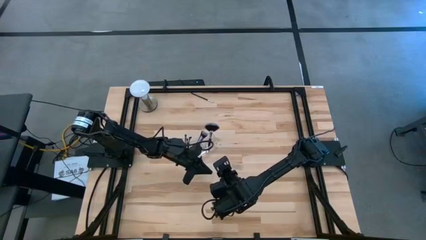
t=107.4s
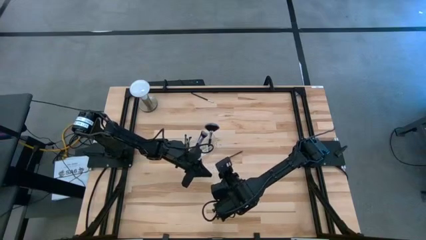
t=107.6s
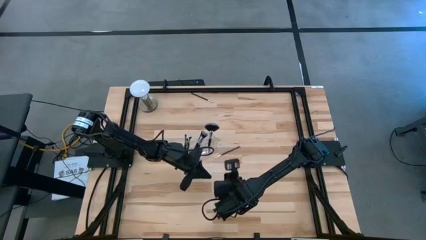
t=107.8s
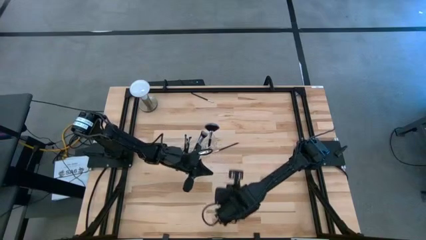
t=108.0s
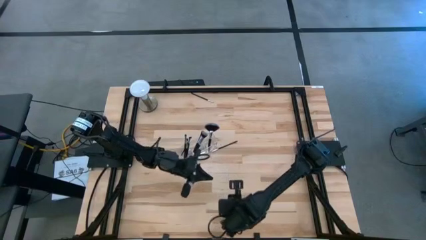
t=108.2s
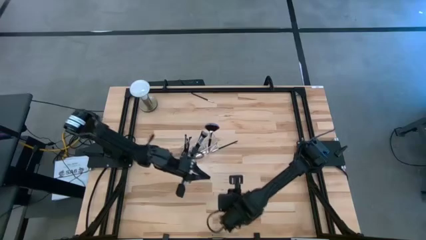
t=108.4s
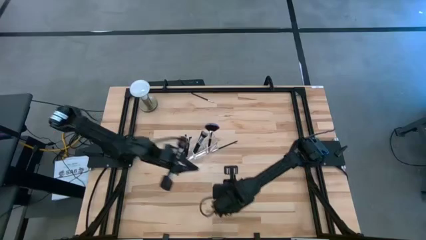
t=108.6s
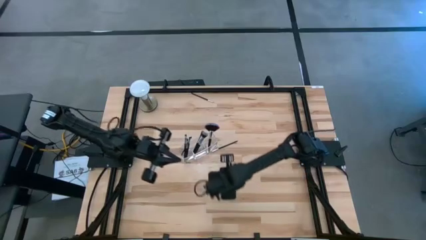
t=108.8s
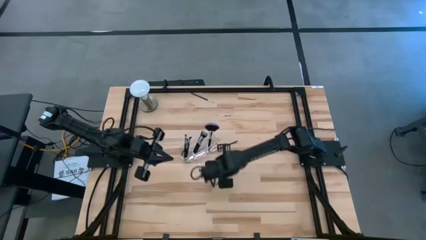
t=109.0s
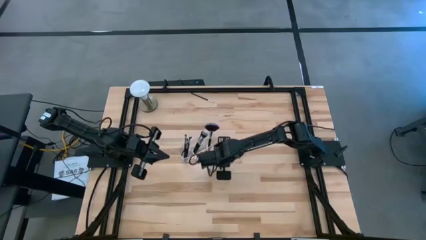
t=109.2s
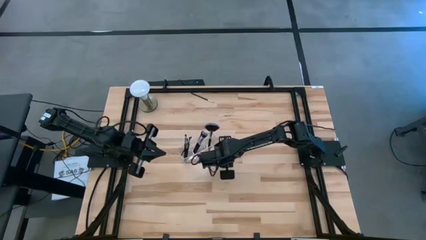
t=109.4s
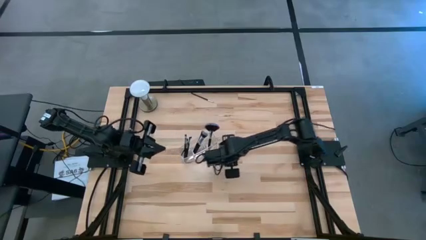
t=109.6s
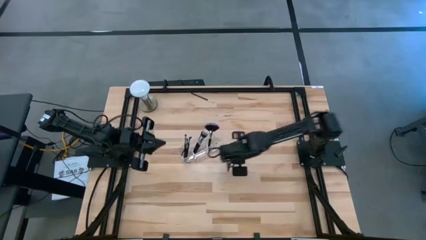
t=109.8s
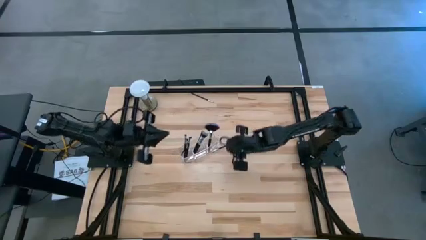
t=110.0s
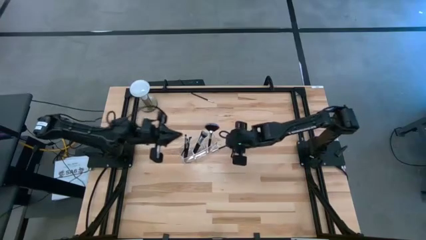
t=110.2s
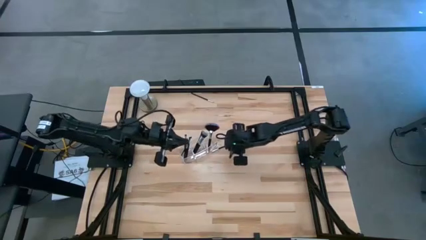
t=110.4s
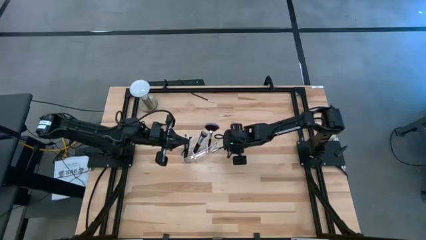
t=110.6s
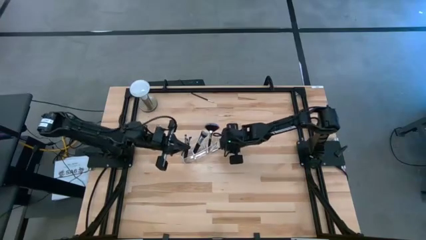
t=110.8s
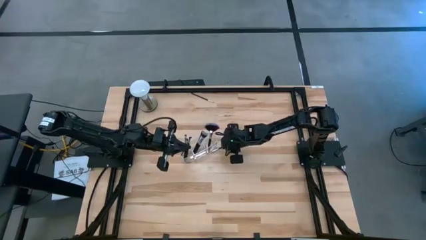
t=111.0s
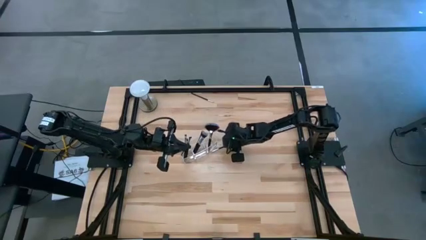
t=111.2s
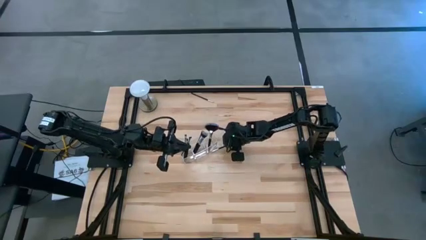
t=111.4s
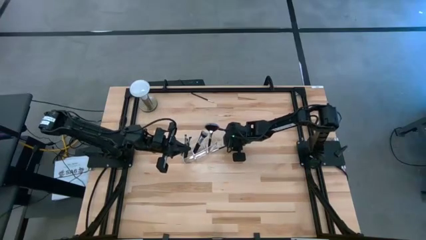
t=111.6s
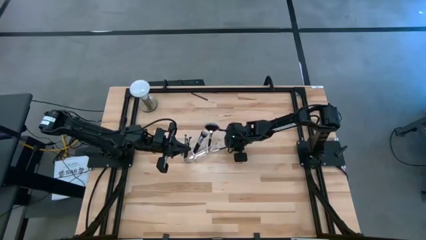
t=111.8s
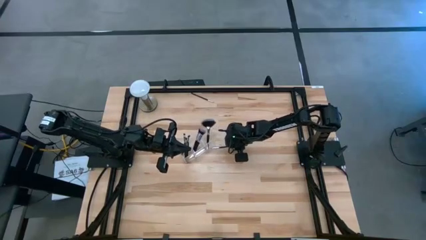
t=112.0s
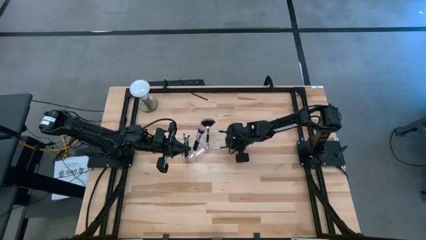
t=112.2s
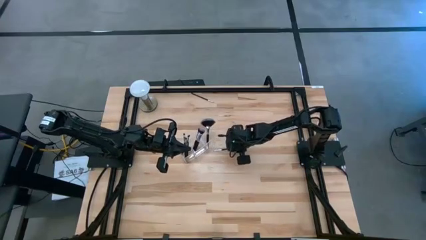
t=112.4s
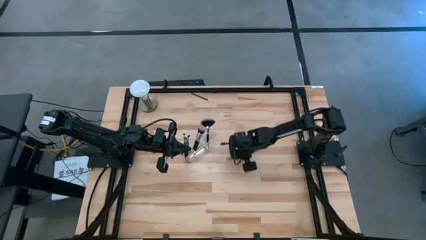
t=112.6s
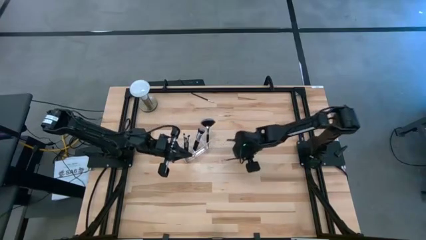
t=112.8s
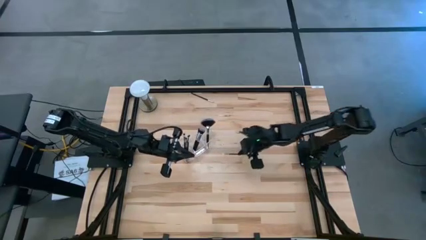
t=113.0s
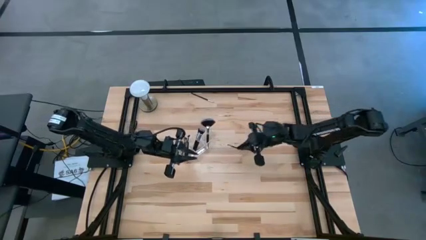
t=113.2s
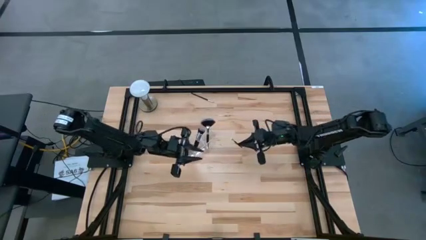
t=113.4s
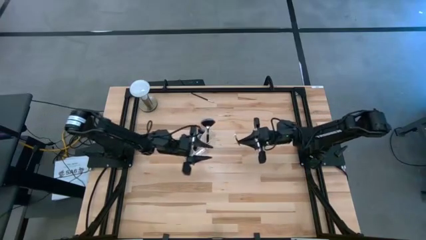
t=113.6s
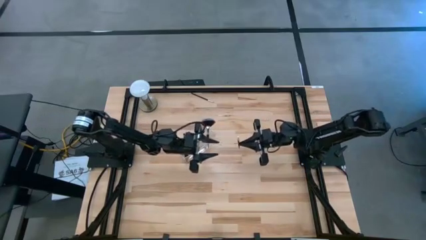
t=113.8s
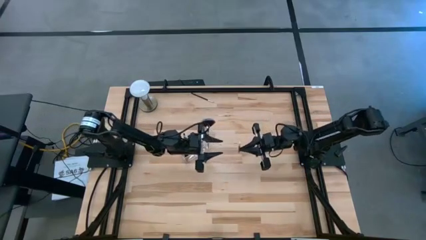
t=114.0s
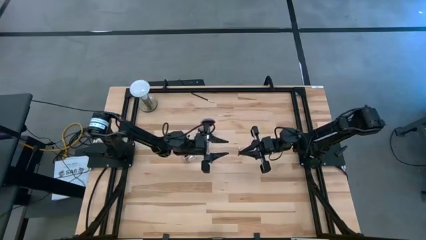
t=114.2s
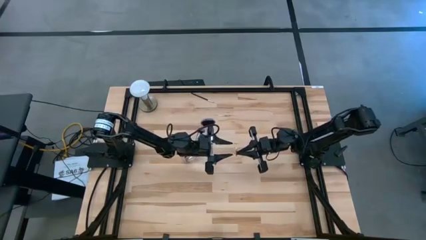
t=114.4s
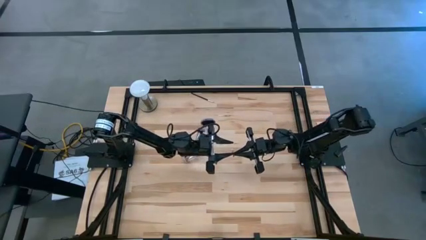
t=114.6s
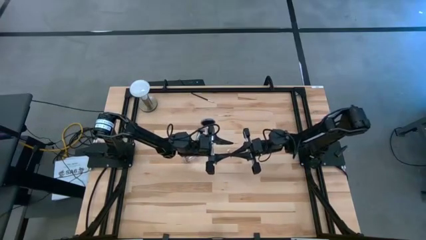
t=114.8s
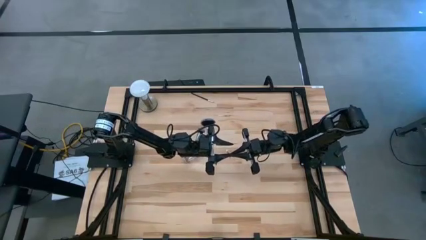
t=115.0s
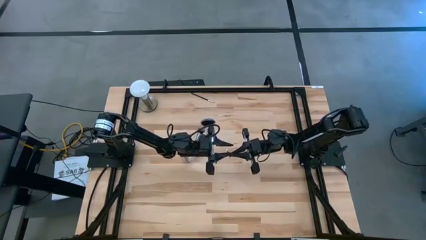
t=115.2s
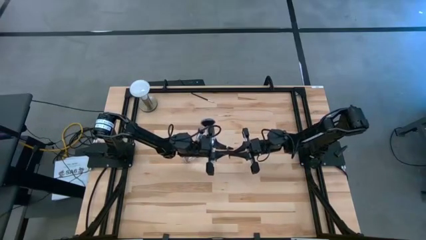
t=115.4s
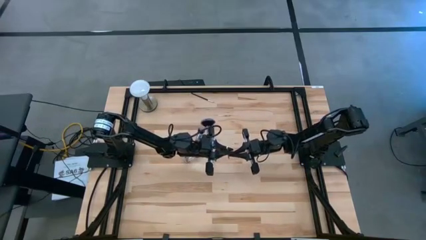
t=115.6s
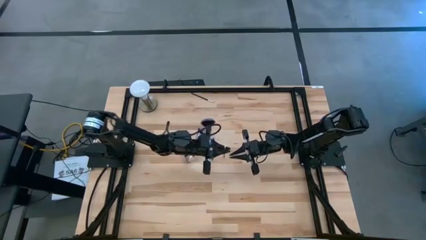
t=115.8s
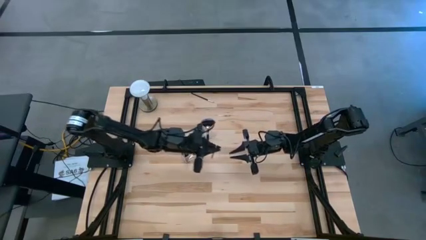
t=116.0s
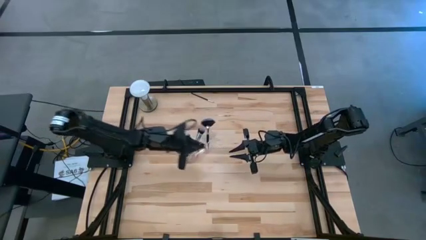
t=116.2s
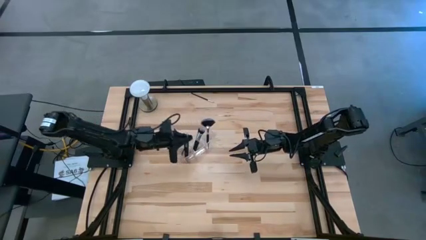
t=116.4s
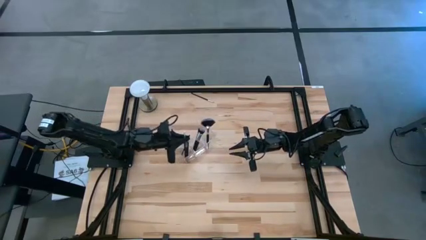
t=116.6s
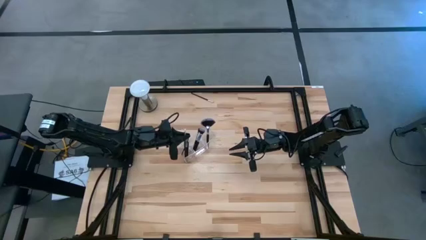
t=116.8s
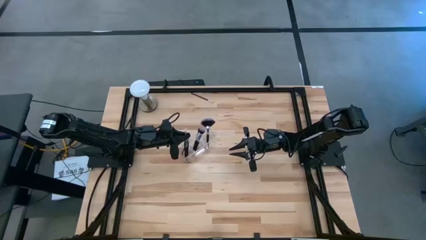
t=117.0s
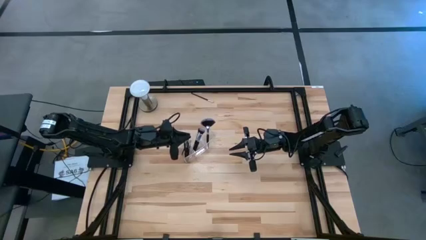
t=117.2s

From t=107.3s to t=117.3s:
Task: Put items in baskets/containers
Put the white eyeshadow brush into the left section of the transparent organizer

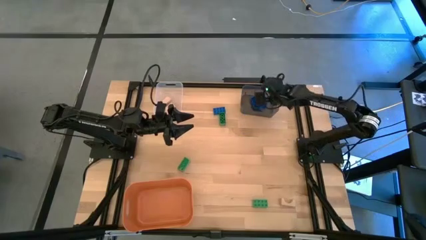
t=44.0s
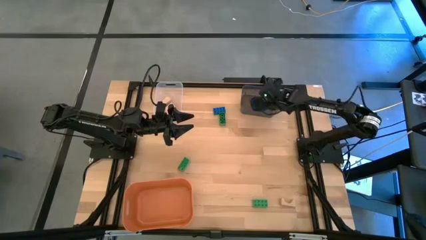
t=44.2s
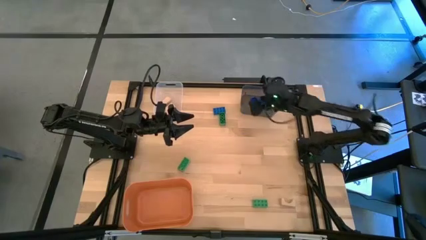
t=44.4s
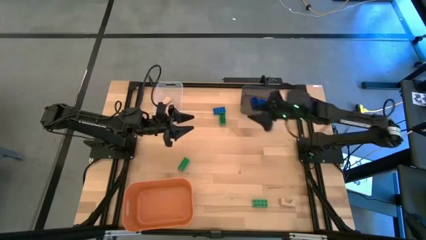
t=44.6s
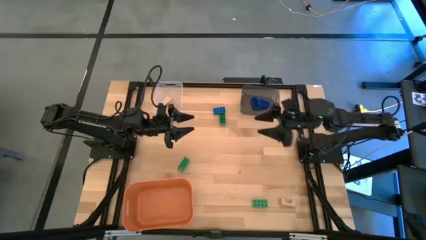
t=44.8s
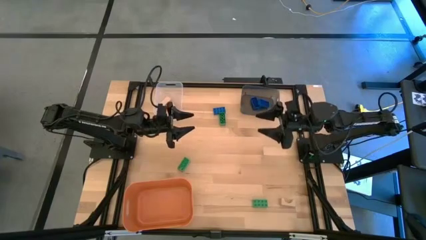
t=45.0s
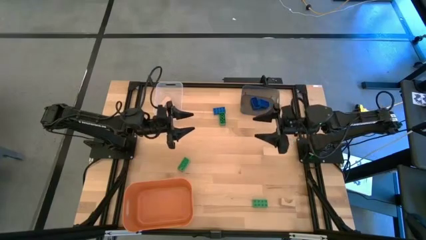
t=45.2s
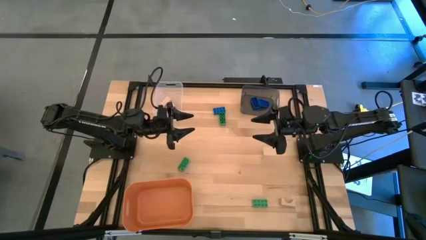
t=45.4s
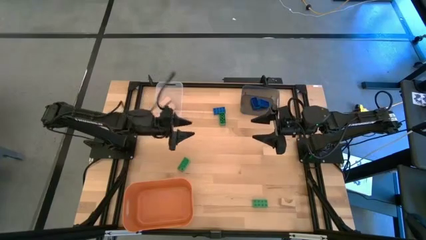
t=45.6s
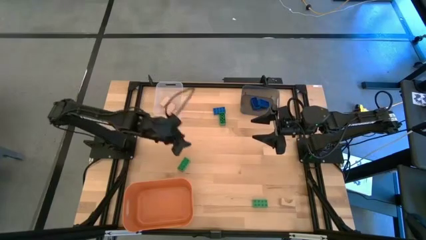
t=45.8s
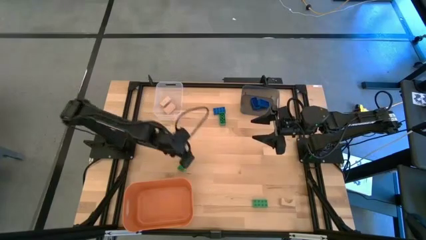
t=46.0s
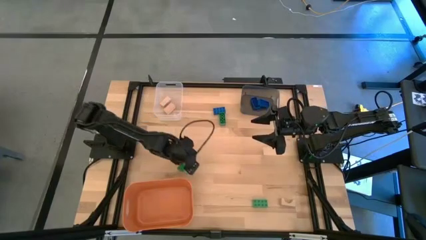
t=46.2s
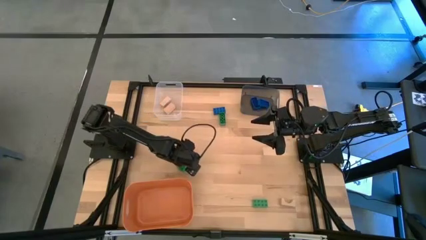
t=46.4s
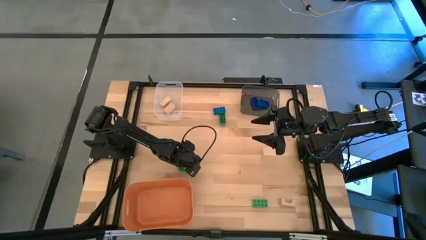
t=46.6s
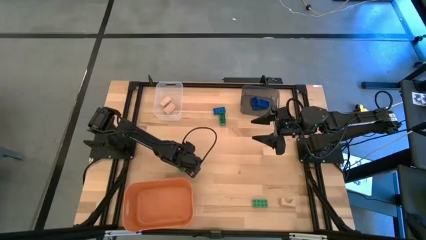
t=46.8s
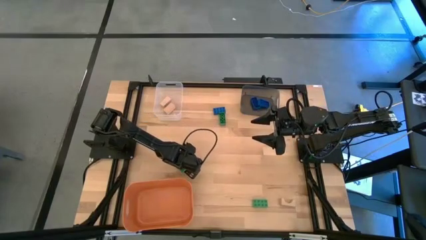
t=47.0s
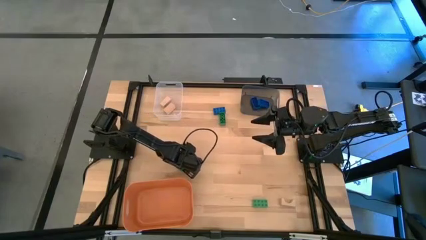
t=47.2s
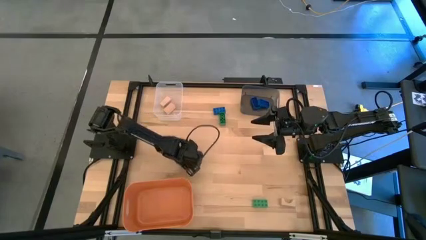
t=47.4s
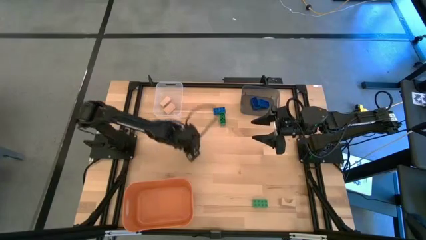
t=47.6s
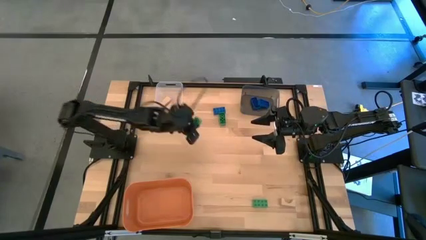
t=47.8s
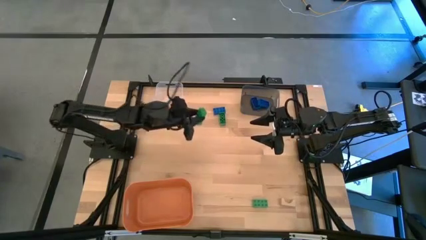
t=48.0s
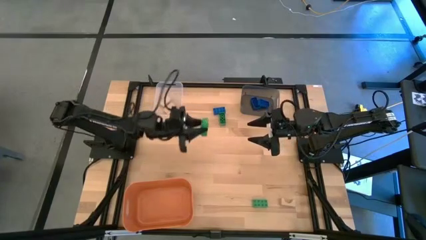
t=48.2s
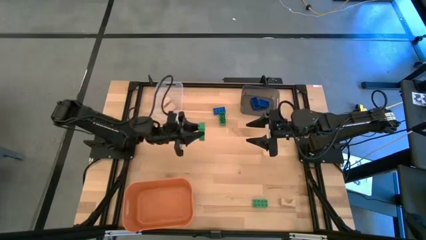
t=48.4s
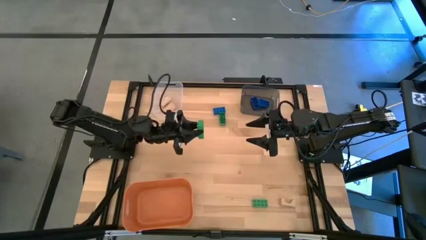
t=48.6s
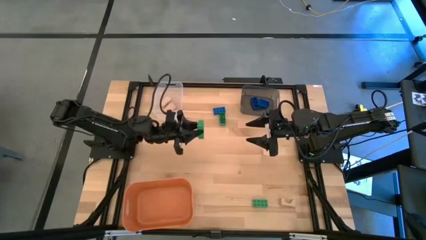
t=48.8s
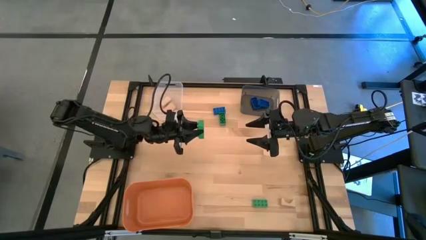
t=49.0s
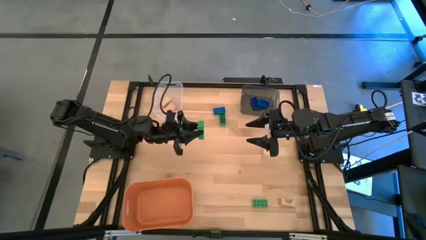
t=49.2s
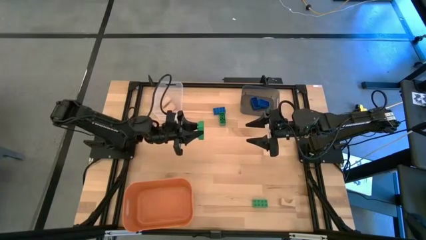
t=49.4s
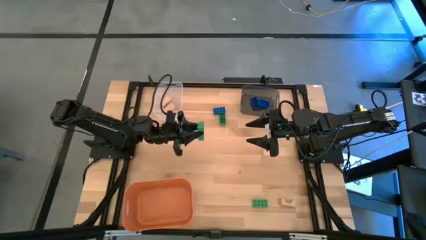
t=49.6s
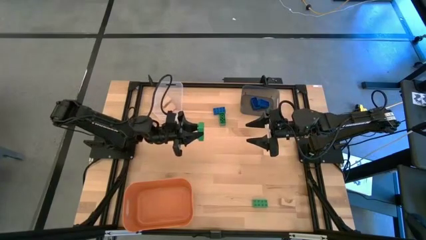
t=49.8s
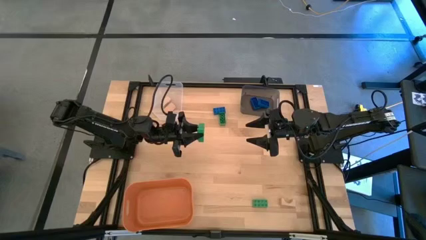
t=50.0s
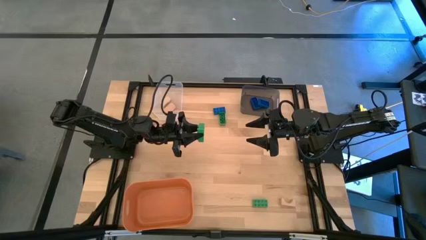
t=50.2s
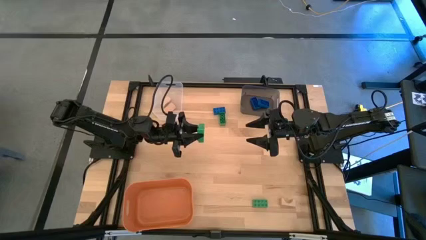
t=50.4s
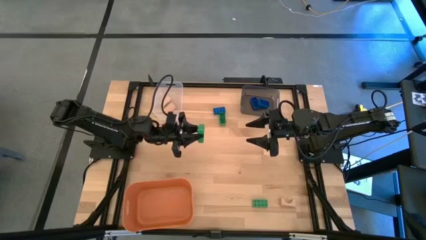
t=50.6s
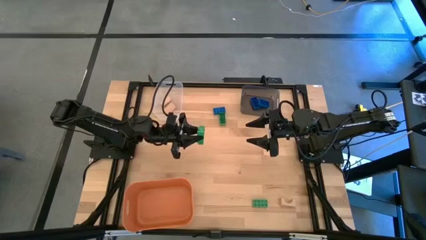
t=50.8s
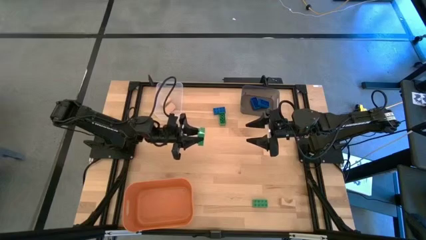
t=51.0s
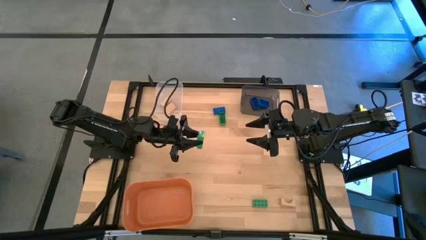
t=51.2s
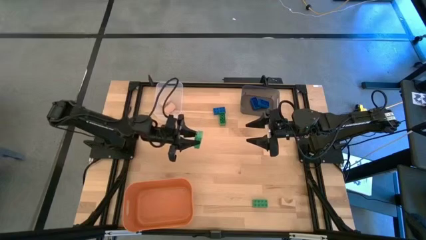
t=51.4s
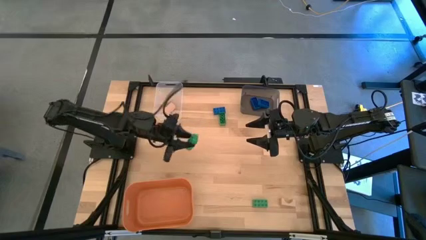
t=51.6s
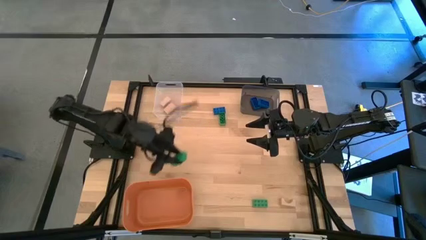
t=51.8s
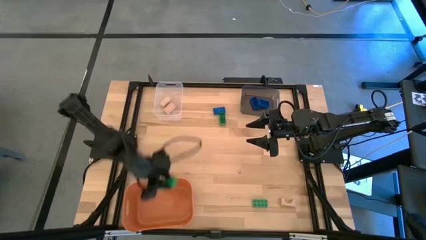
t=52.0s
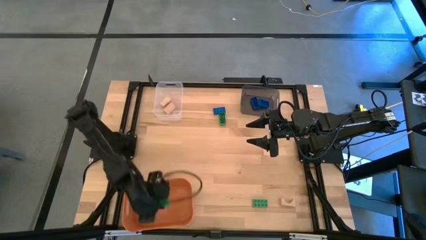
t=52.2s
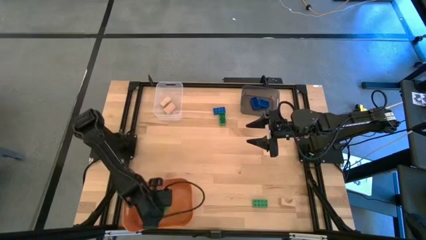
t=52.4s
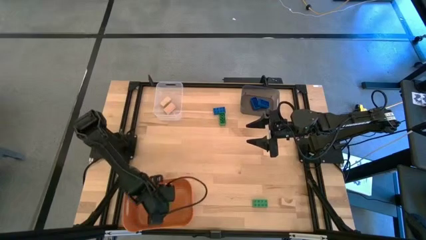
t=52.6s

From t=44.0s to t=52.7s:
Task: Sort & place blocks by color
Put the middle green game piece into the orange bin
